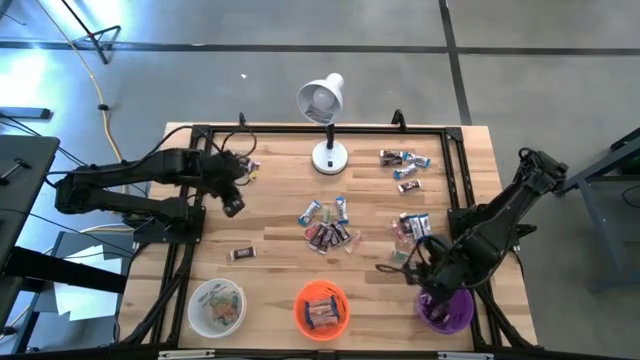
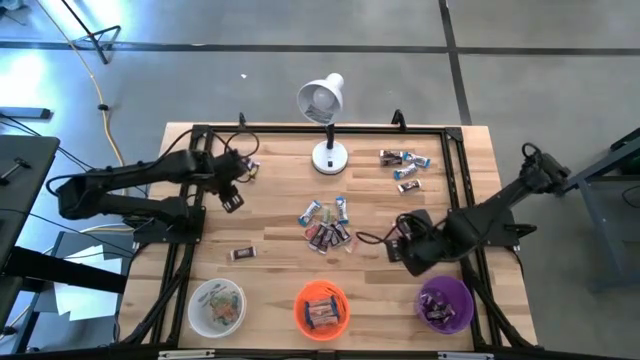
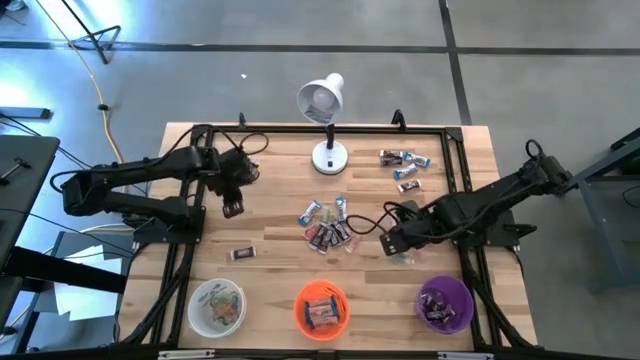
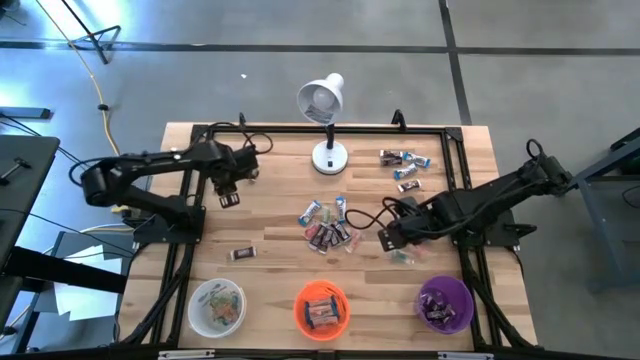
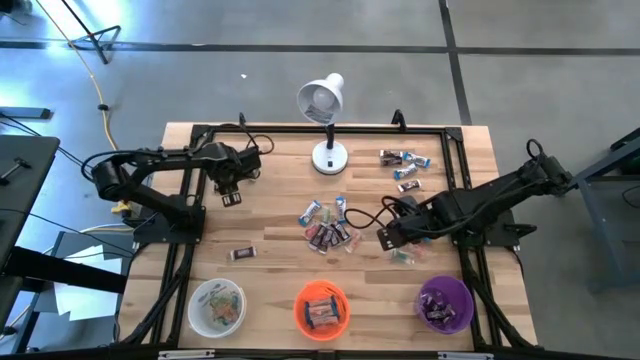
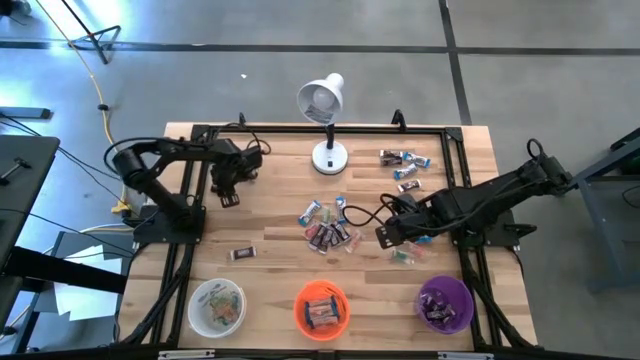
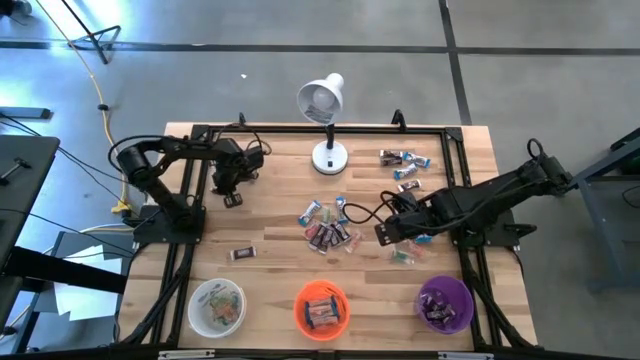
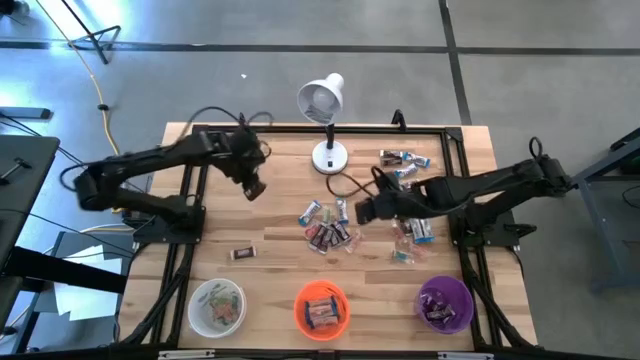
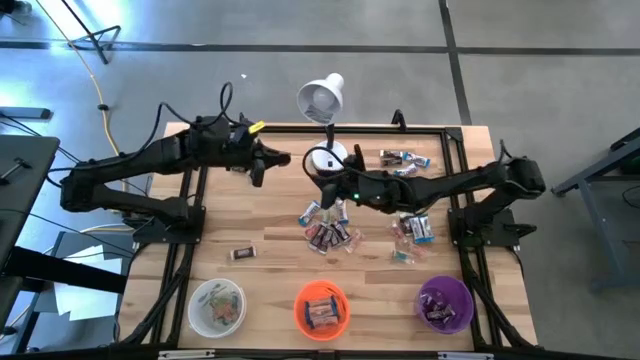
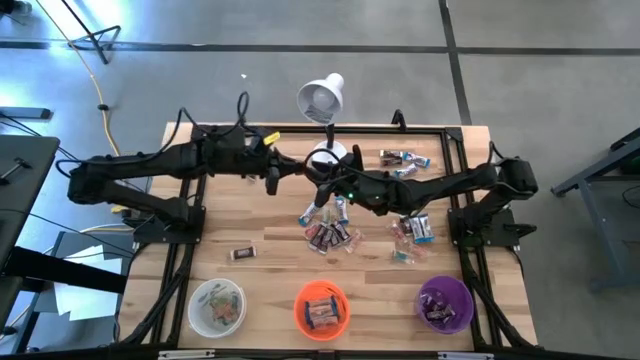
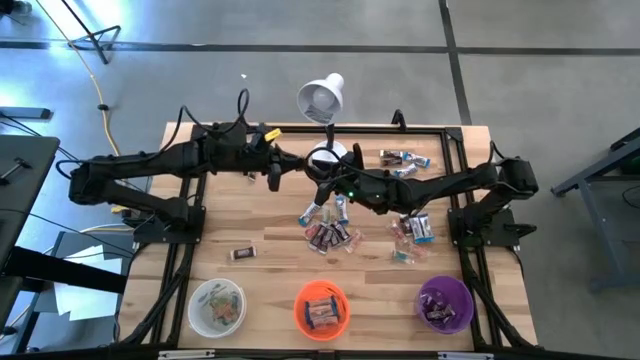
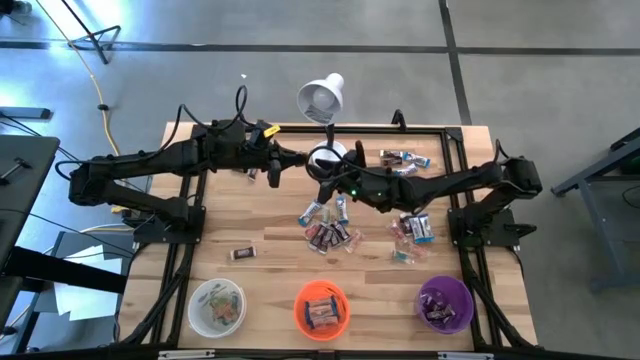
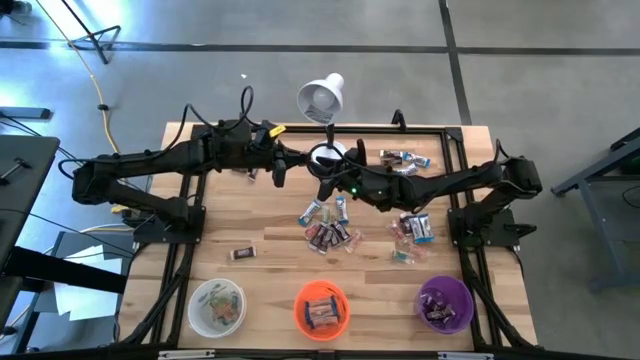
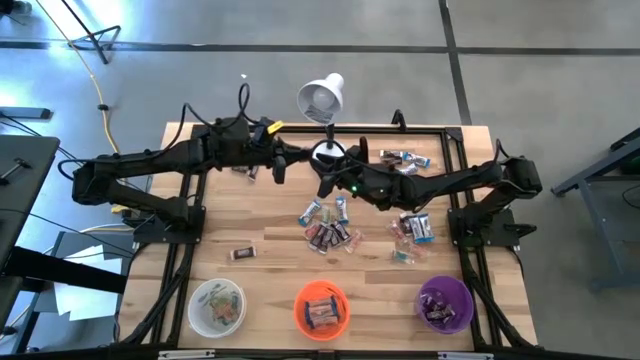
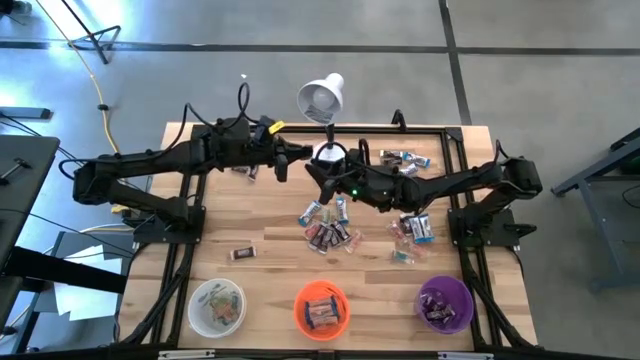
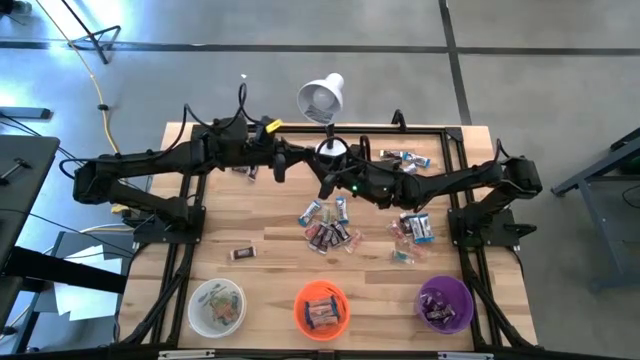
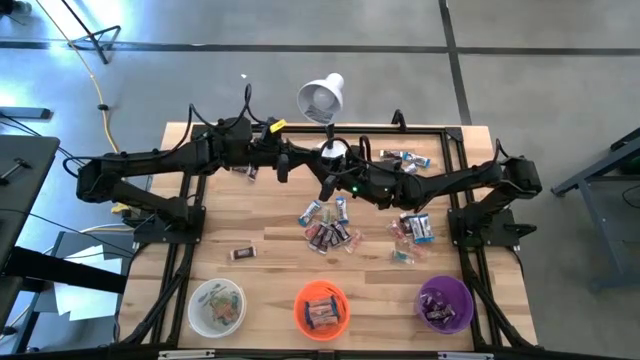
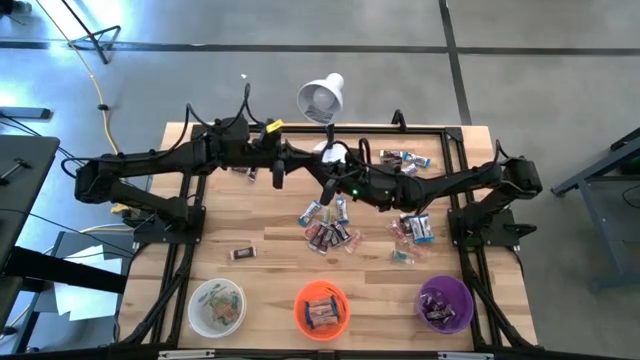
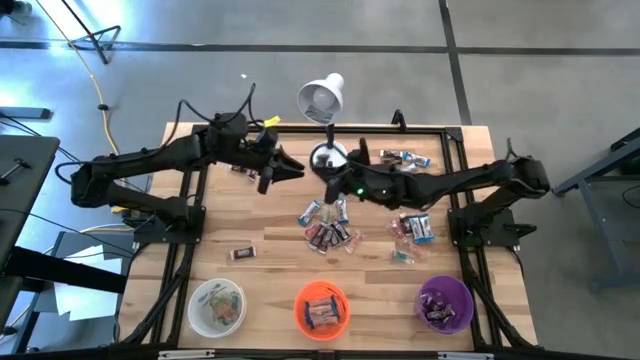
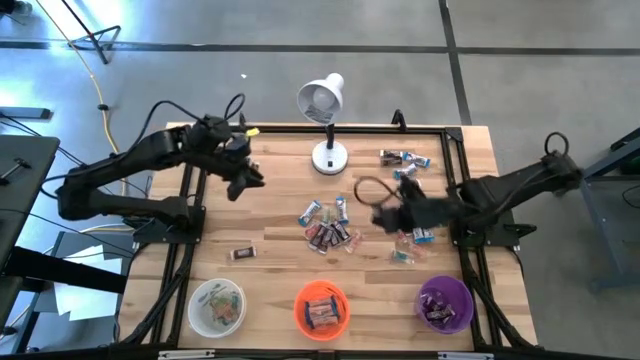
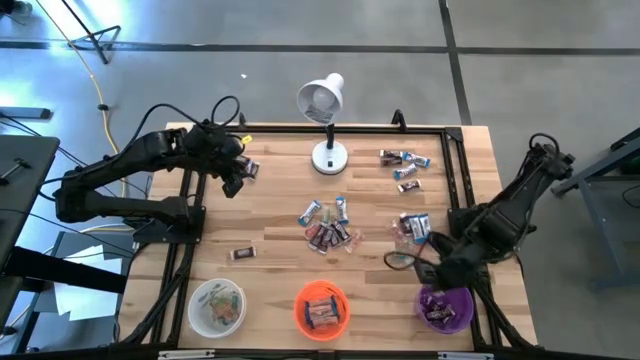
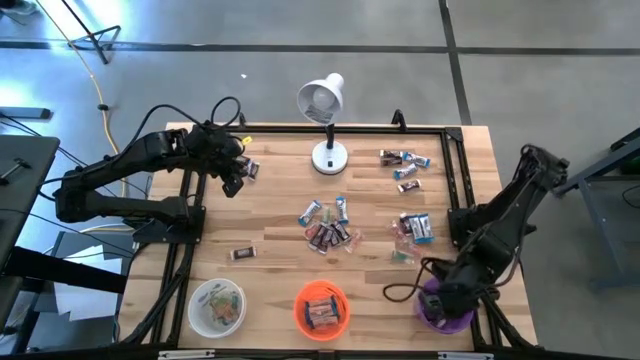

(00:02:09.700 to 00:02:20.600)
Task: Organize candy in baskets
Put the brown chocolate bar into the purple bucket

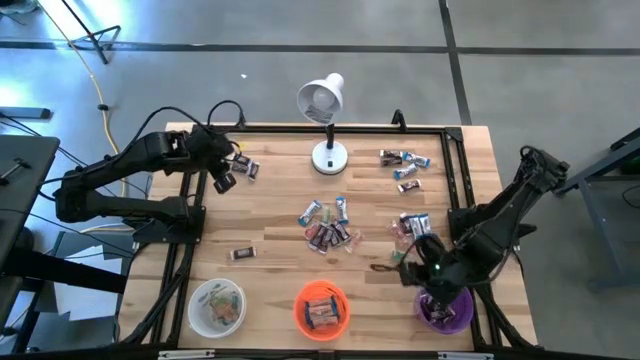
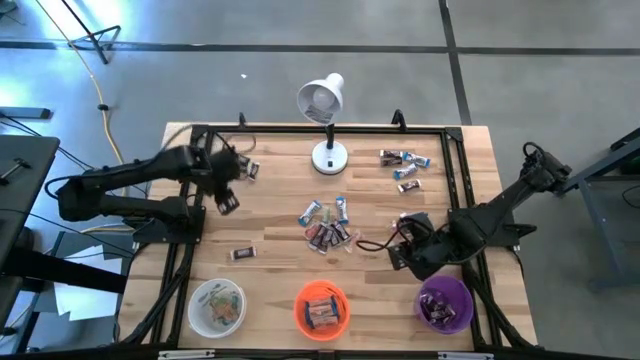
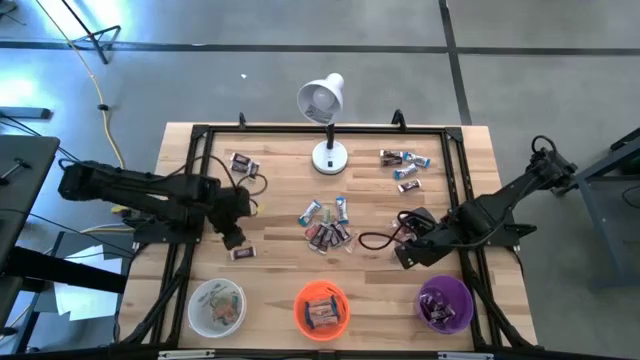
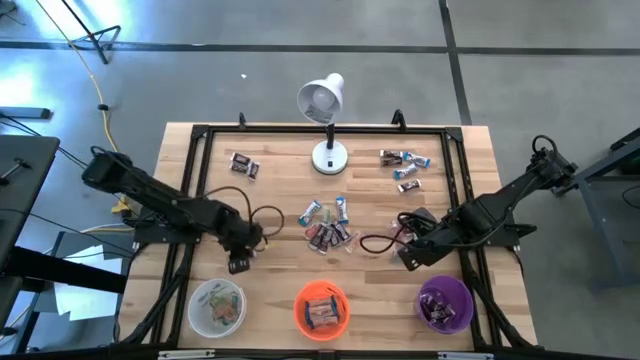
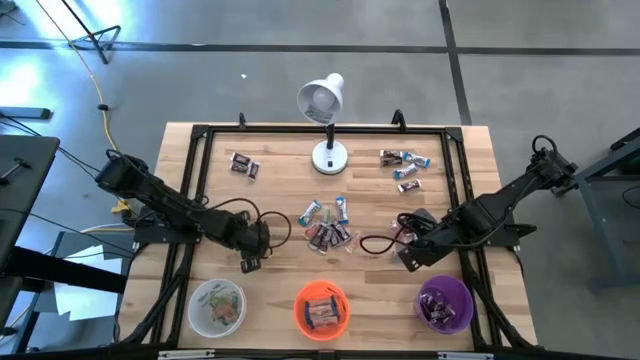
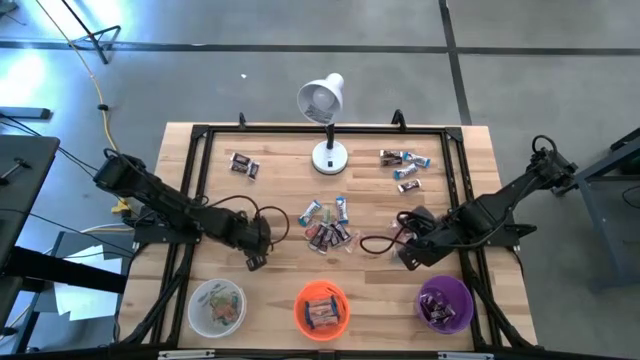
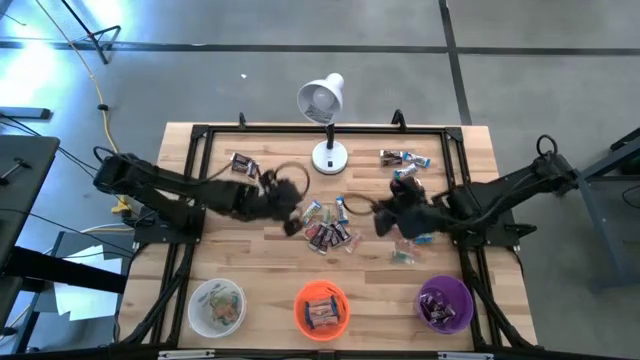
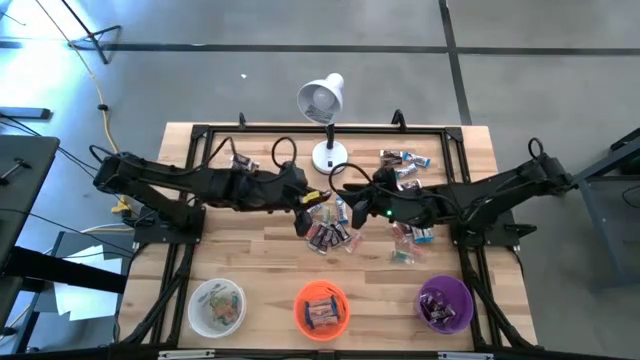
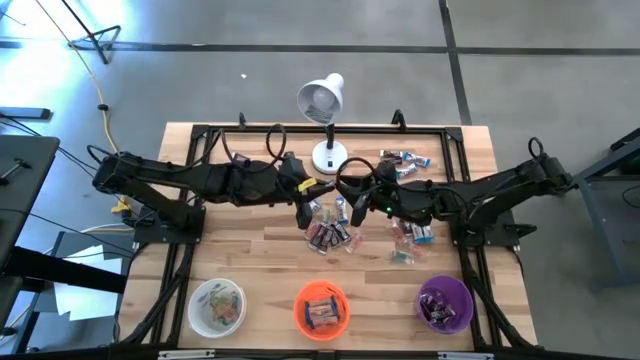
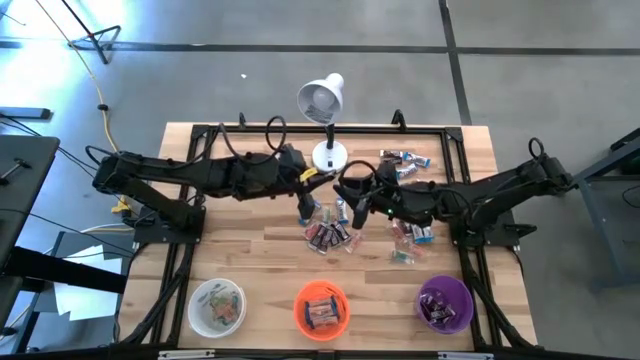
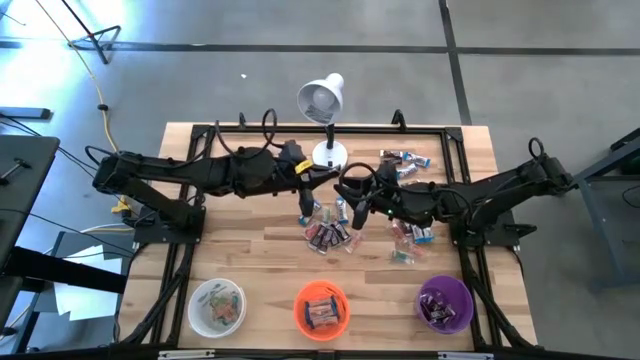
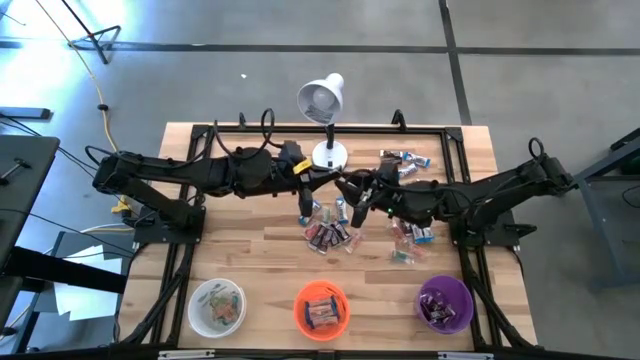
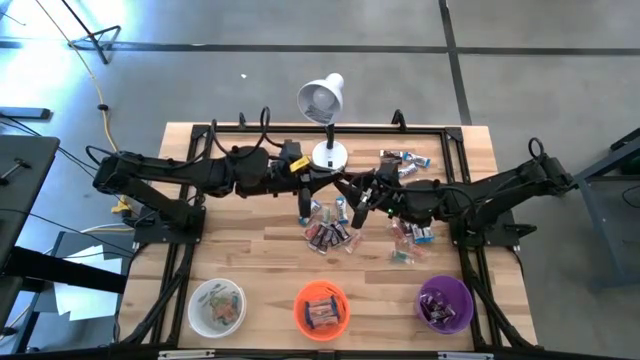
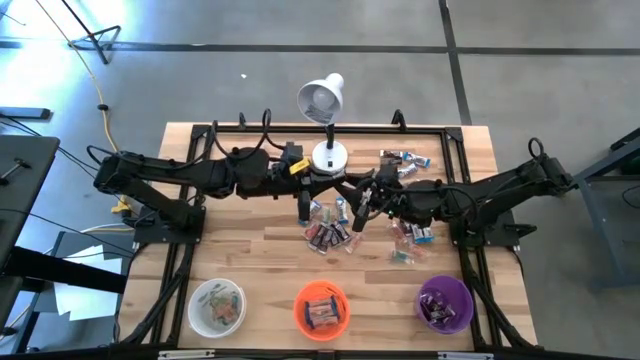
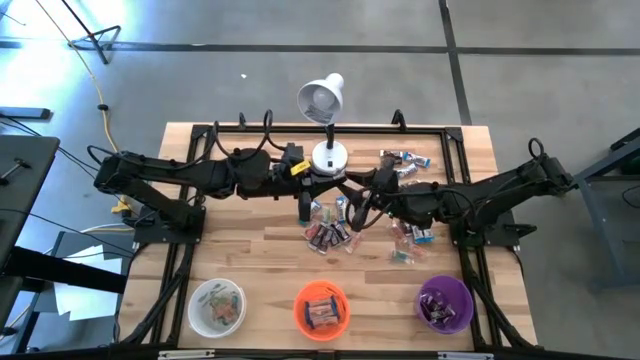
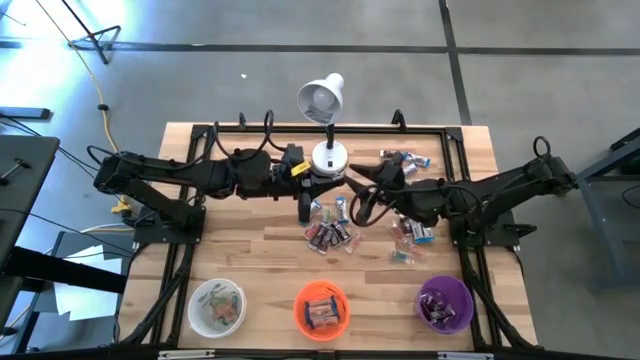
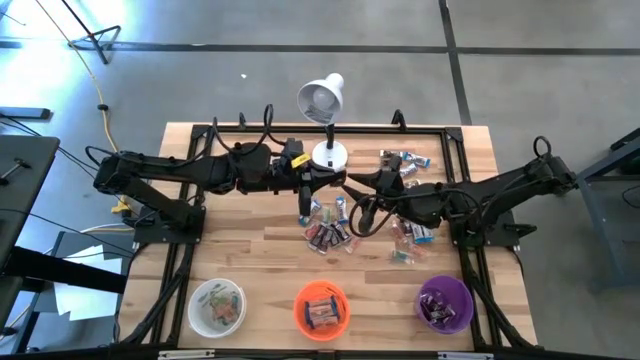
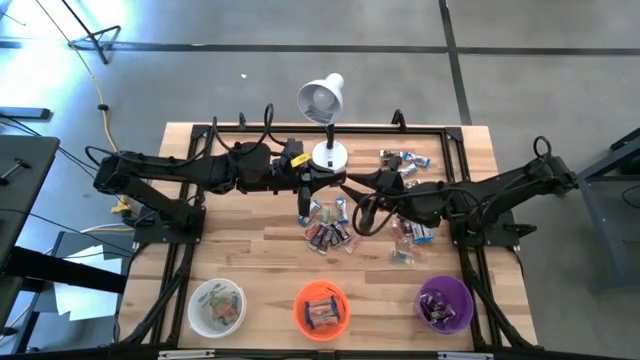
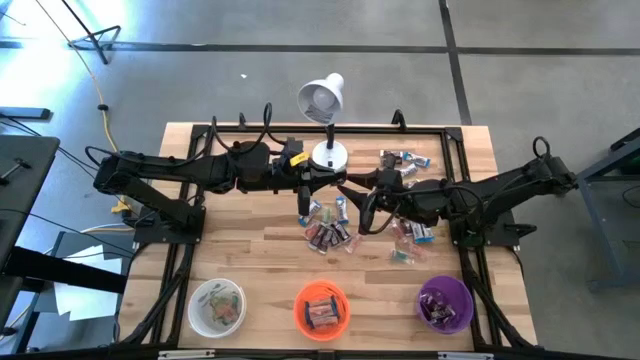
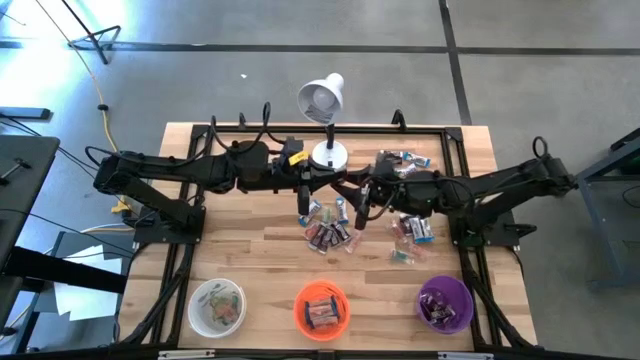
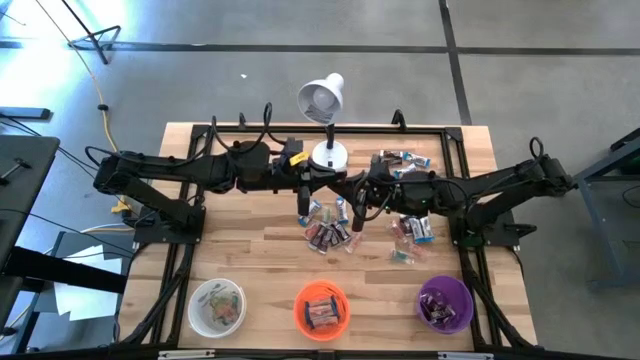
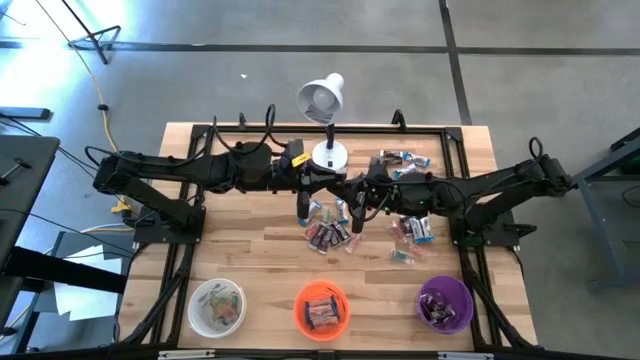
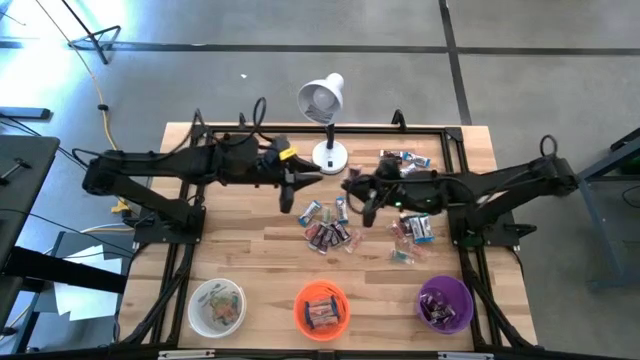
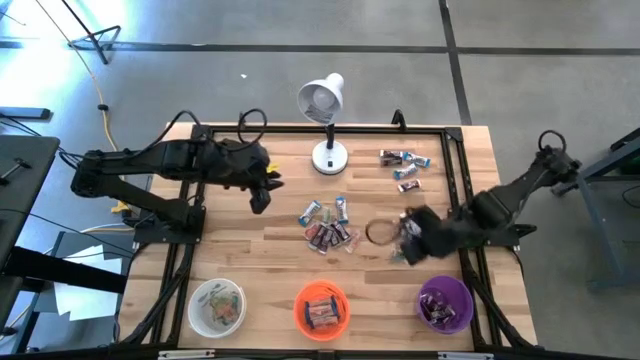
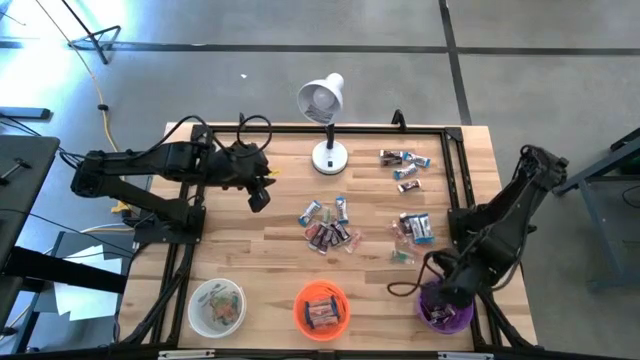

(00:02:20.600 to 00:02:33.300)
Put the brown chocolate bar into the purple bucket
